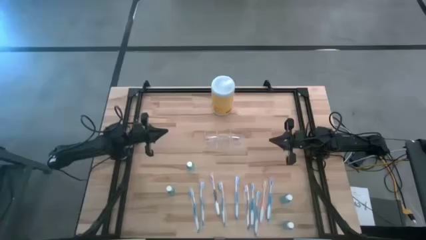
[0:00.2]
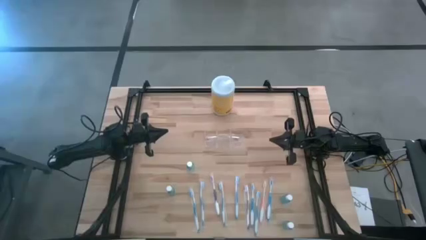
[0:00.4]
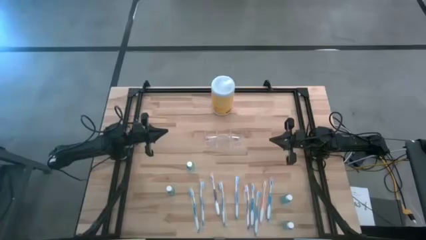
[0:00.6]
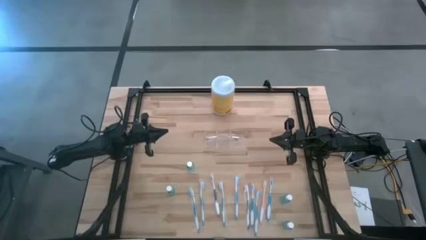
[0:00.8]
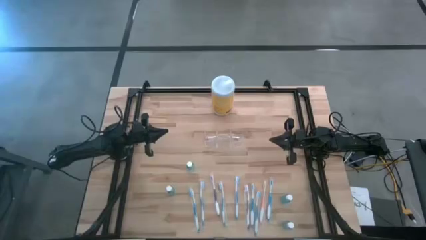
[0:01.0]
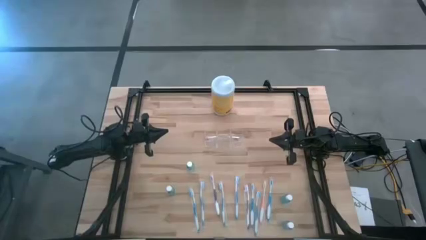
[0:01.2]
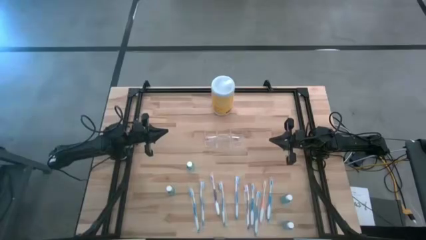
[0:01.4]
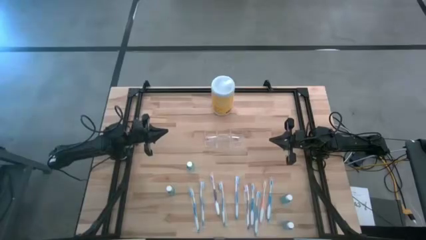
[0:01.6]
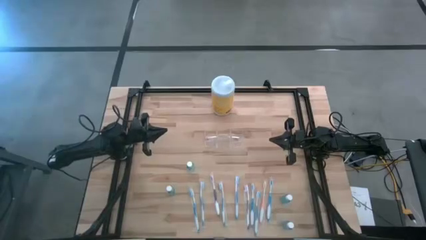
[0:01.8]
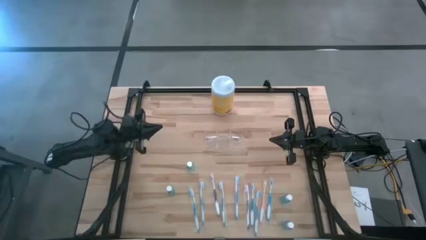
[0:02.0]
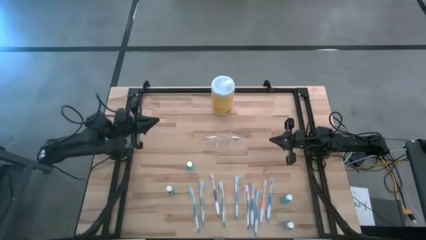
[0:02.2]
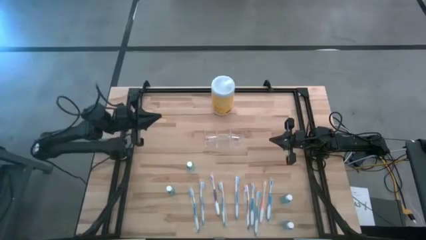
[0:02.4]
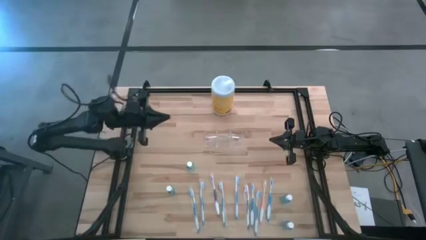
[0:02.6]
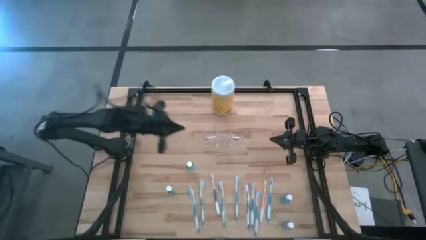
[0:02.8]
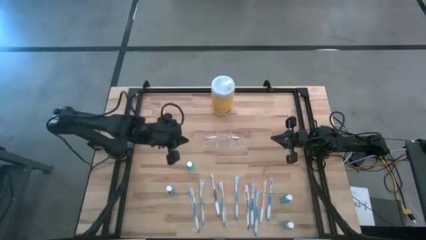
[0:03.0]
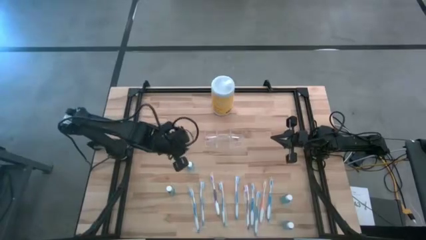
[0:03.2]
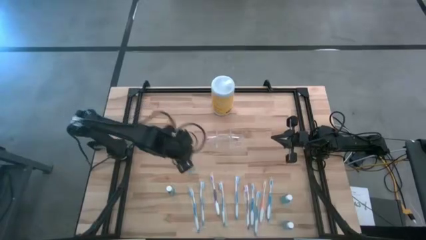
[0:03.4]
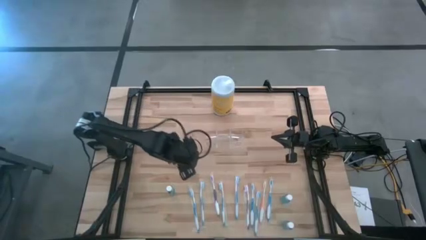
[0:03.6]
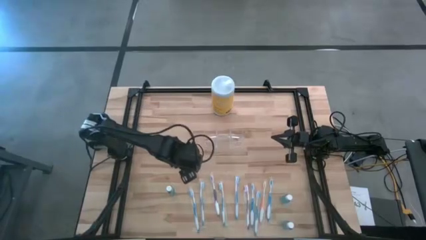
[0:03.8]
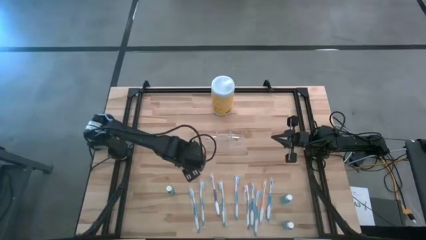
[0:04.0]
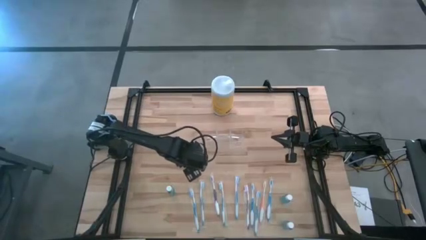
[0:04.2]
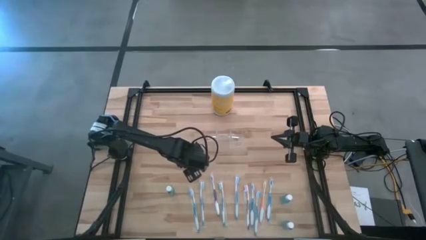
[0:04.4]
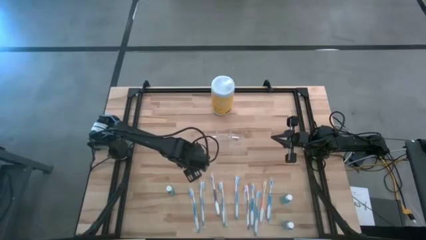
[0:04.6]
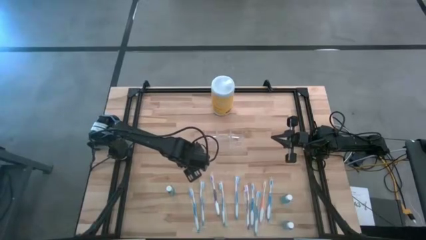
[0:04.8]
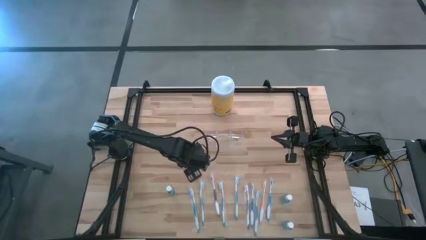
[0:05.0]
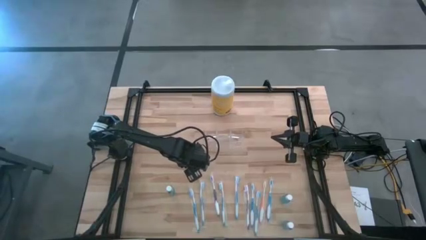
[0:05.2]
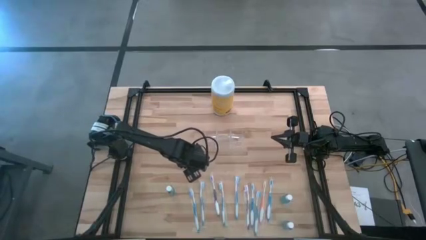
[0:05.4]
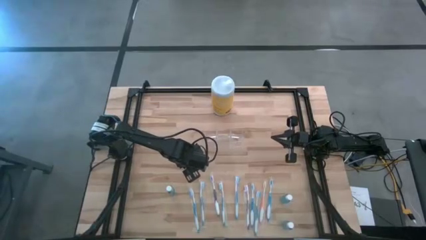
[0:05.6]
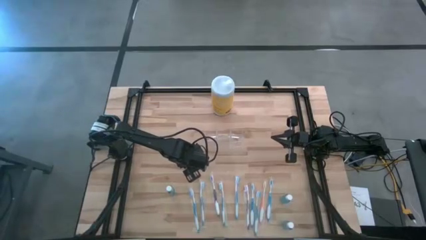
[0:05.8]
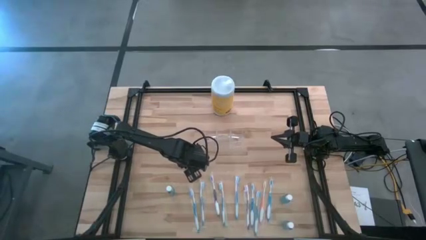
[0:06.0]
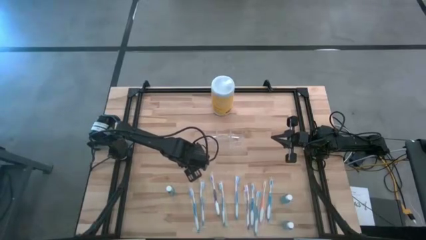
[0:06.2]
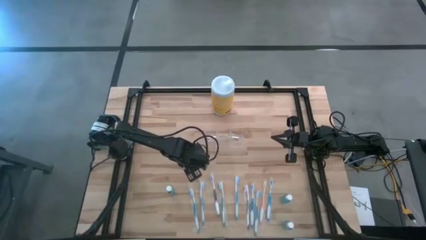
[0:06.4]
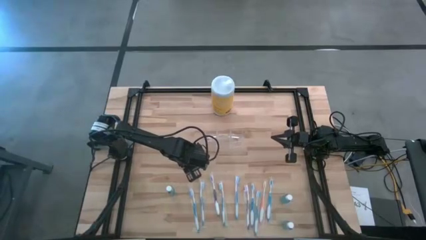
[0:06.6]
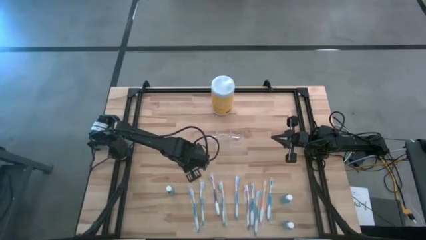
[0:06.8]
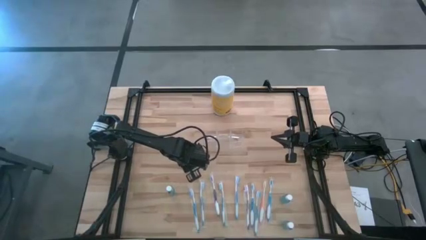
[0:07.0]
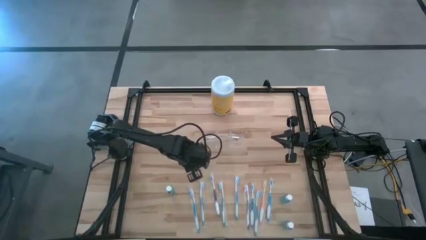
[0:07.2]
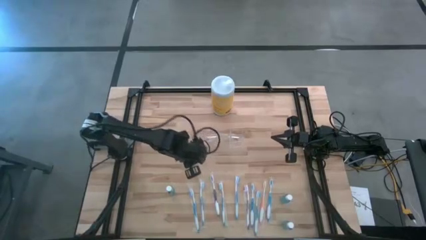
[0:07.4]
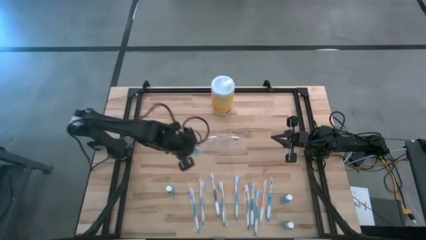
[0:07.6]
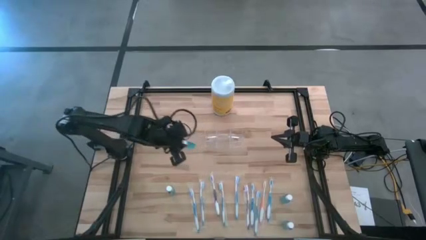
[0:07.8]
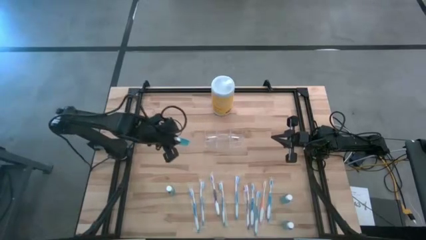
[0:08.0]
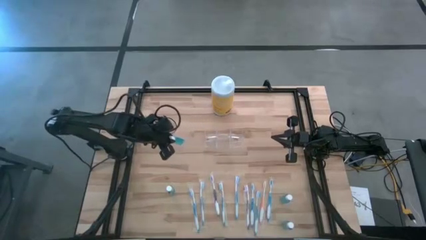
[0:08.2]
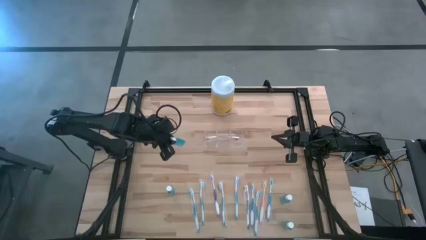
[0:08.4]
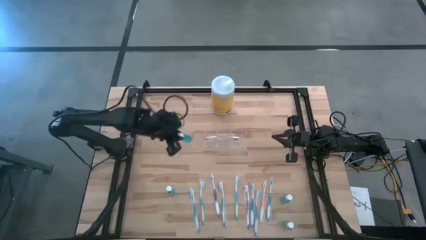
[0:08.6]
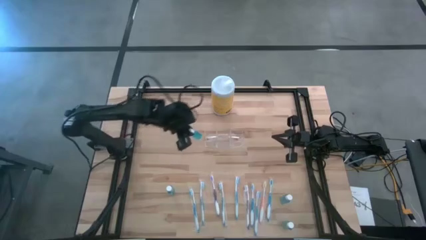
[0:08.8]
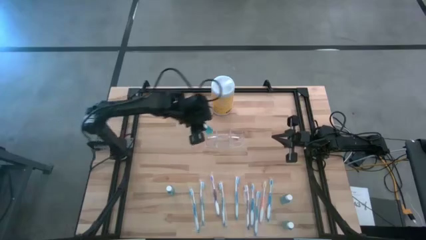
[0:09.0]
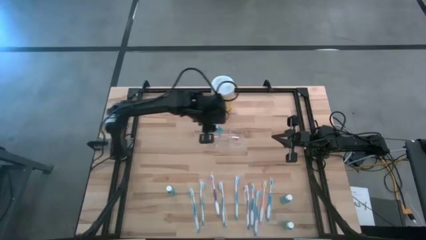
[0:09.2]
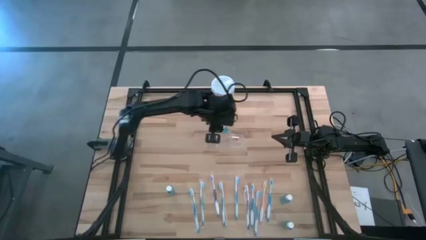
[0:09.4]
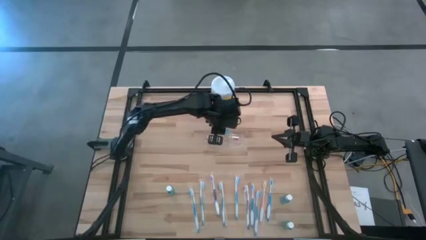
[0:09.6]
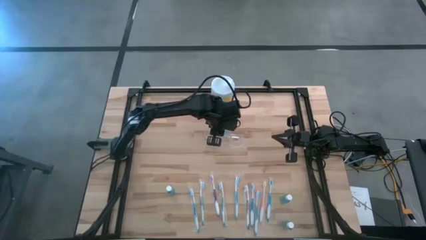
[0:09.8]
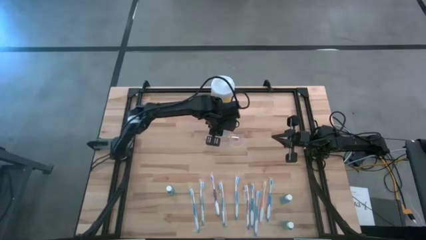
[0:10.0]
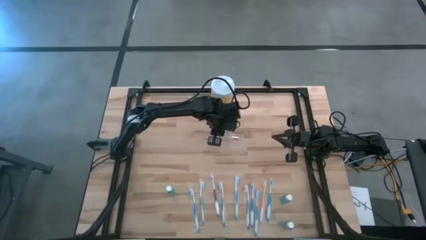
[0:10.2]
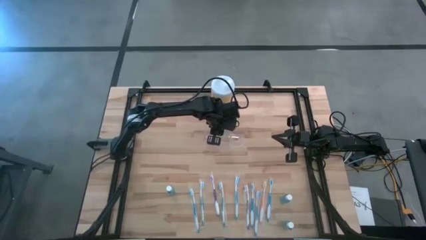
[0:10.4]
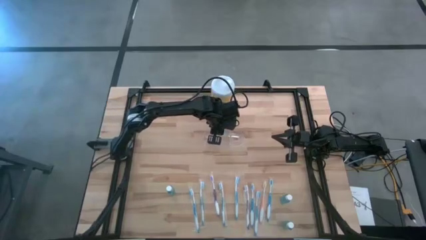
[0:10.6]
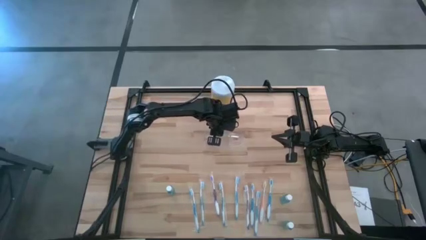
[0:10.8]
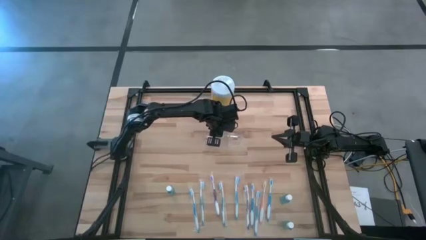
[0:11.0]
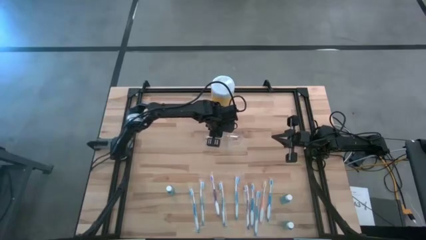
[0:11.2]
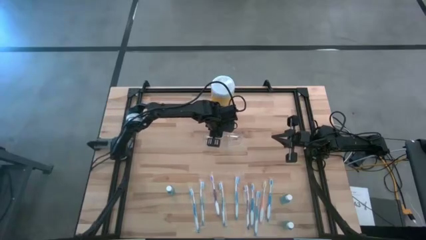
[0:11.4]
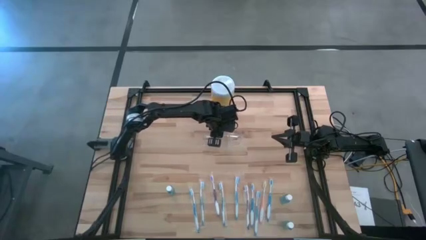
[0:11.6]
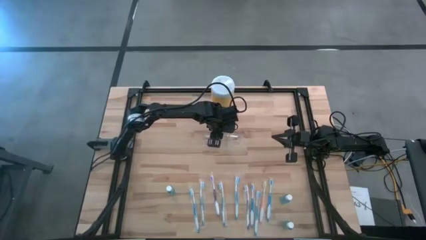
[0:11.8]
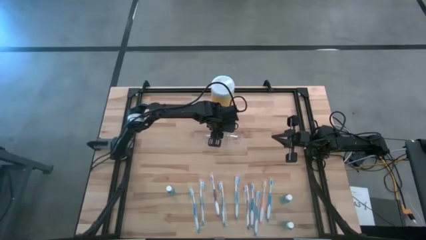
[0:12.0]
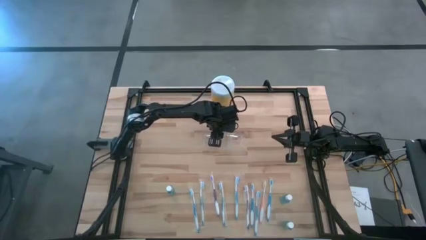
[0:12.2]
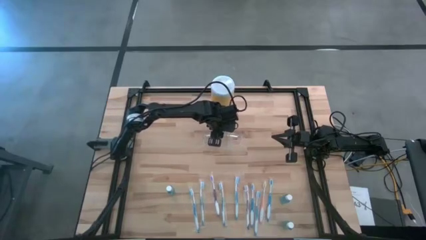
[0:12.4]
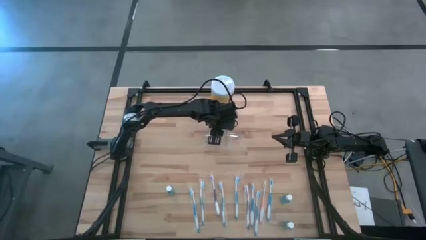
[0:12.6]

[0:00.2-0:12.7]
Task: Pick & Place toothbrushing station
Put the blue mouthwash into the transparent organizer
